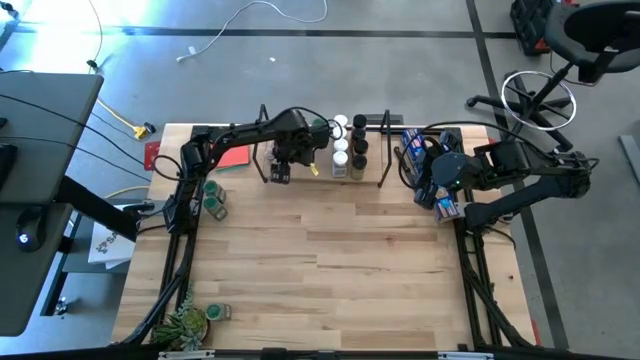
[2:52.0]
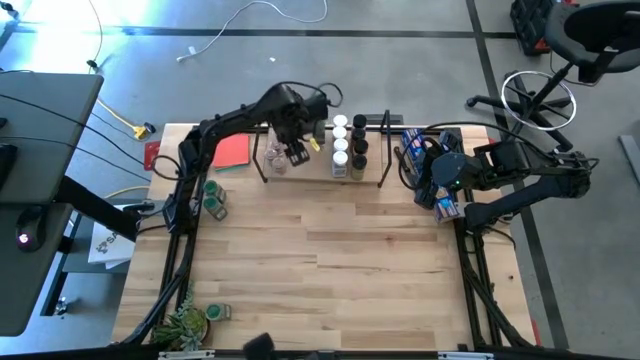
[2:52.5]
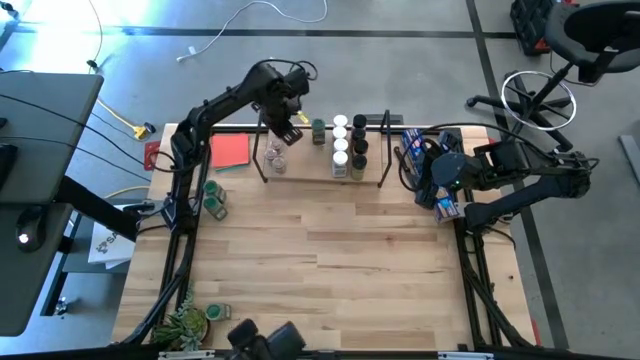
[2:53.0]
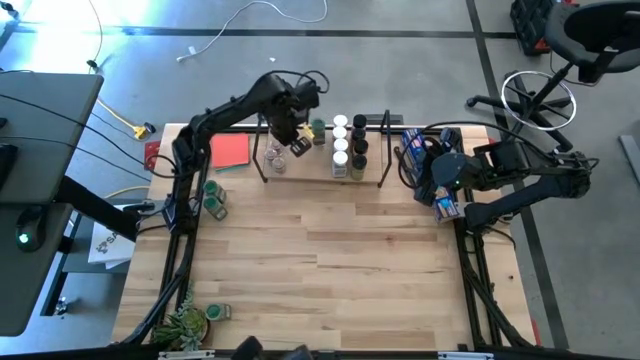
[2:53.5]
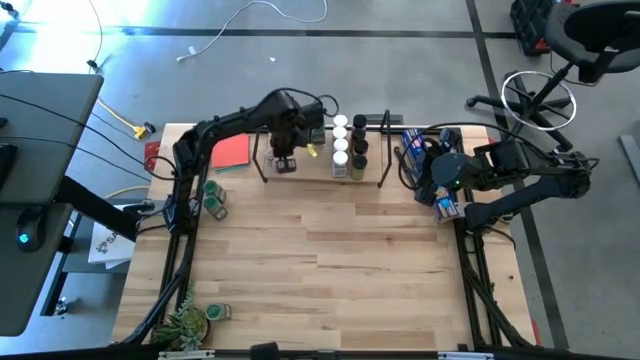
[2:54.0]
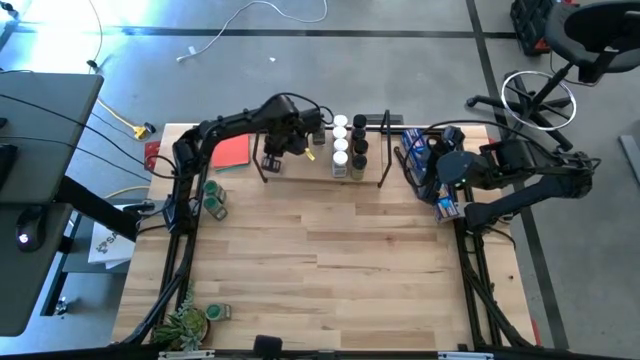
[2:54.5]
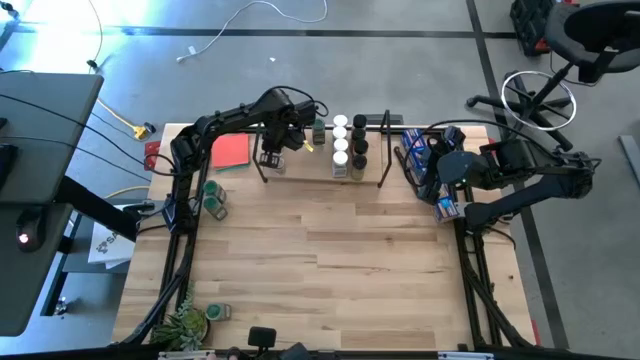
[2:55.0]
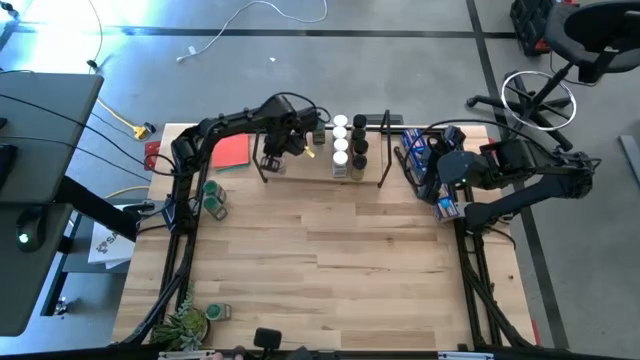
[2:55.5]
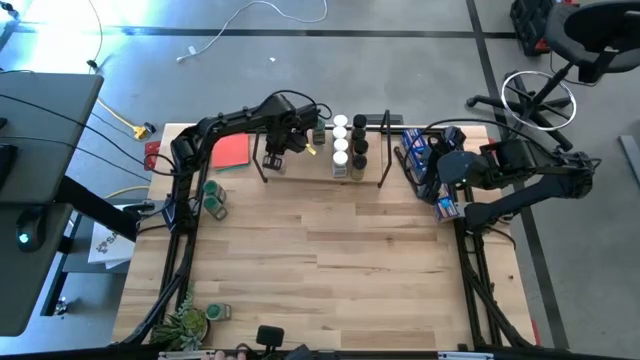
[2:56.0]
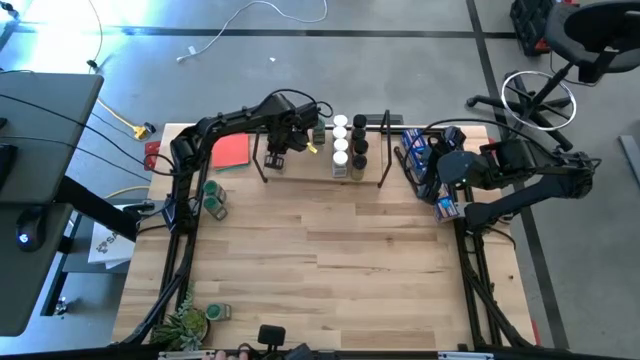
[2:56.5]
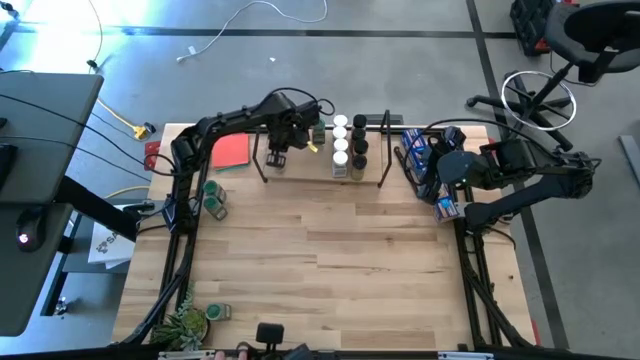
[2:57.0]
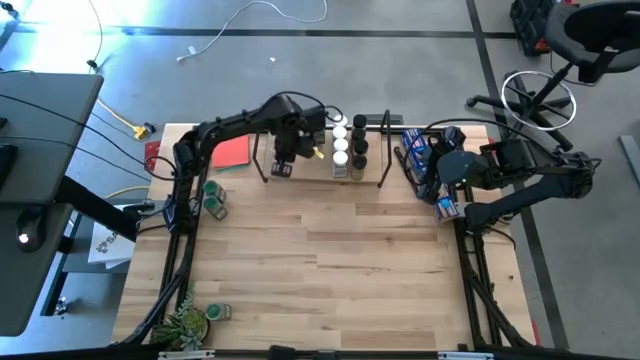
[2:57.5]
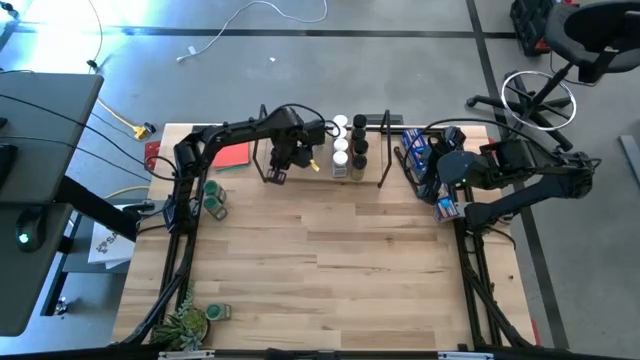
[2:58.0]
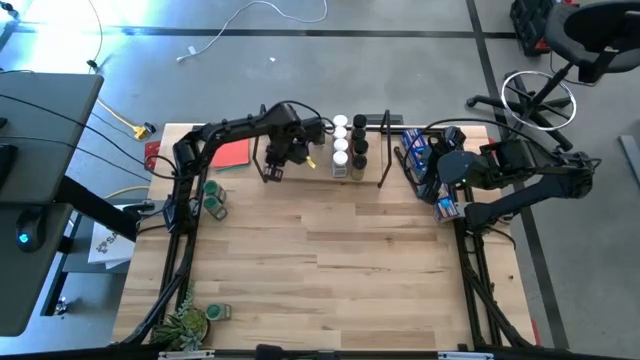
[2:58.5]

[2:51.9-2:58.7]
Task: Shelf spices
Adjust the brown seasoning bottles on the shelf

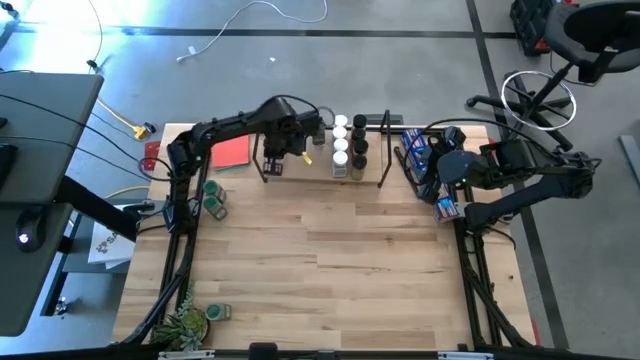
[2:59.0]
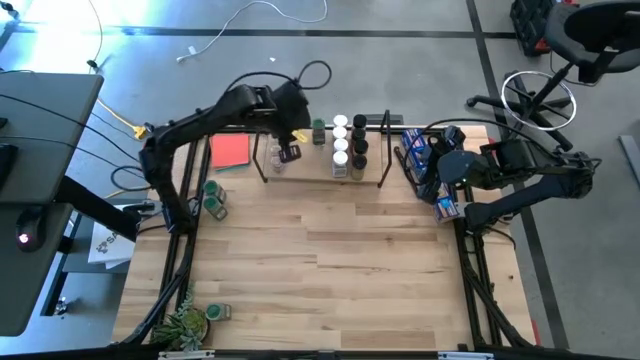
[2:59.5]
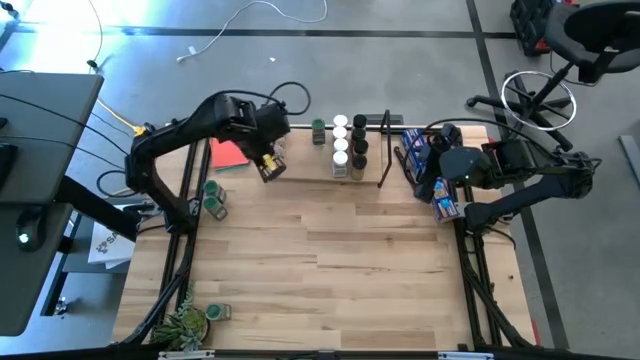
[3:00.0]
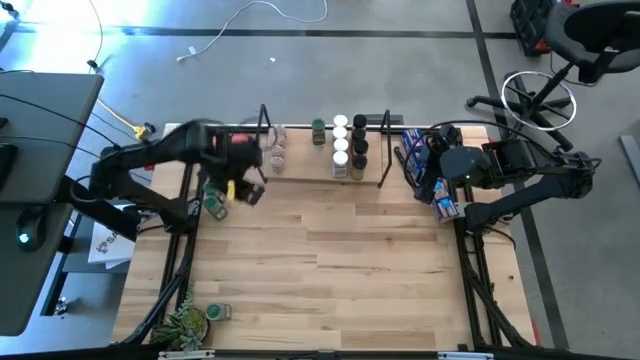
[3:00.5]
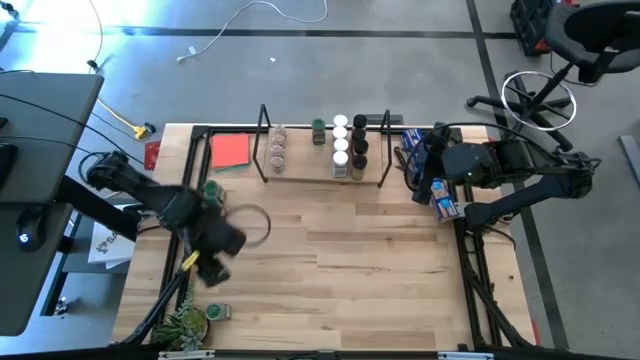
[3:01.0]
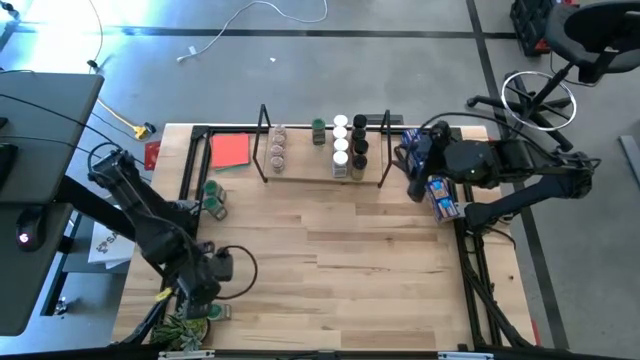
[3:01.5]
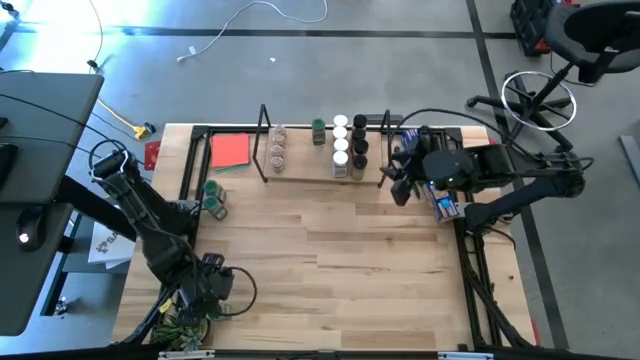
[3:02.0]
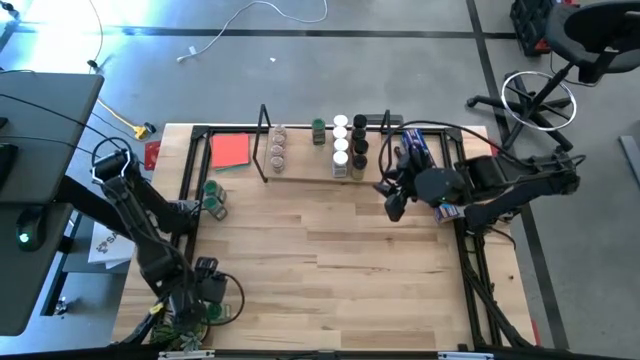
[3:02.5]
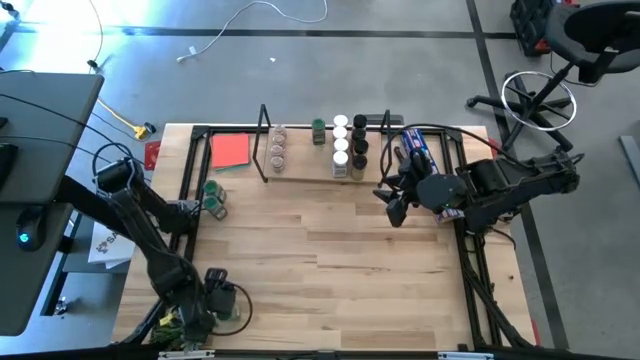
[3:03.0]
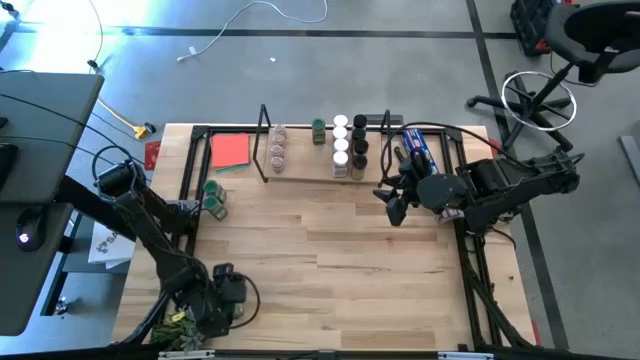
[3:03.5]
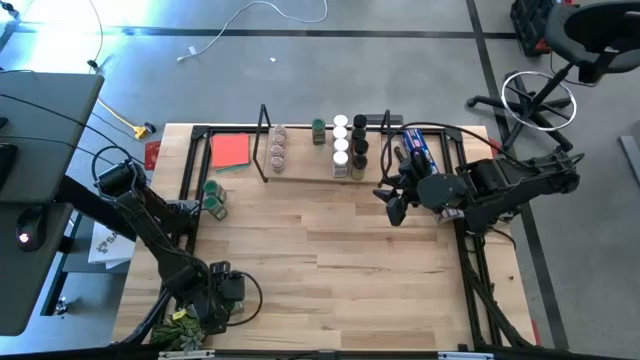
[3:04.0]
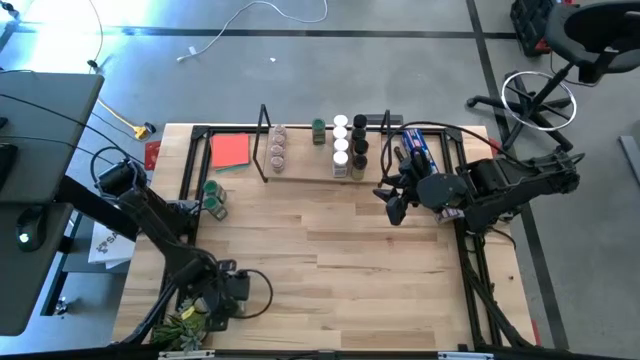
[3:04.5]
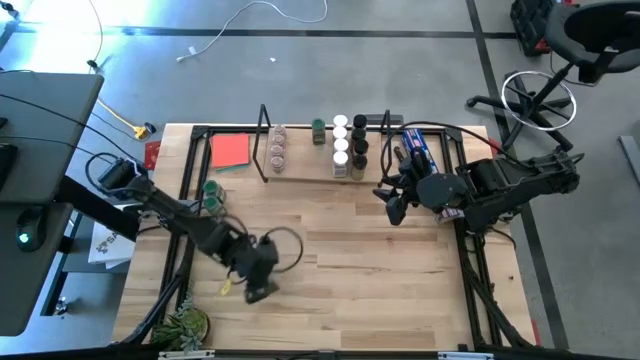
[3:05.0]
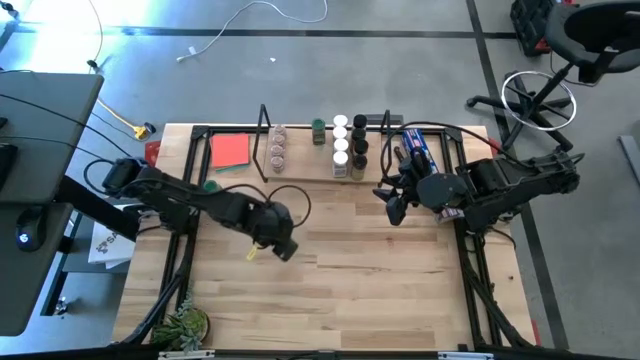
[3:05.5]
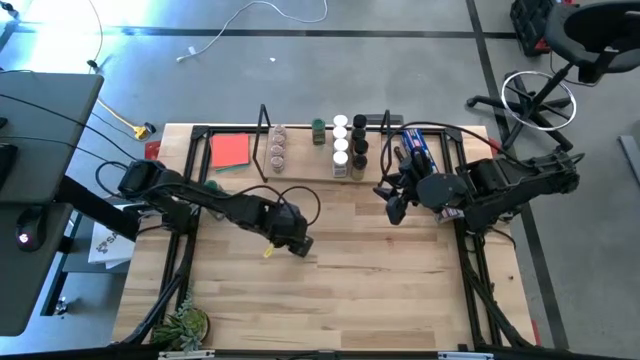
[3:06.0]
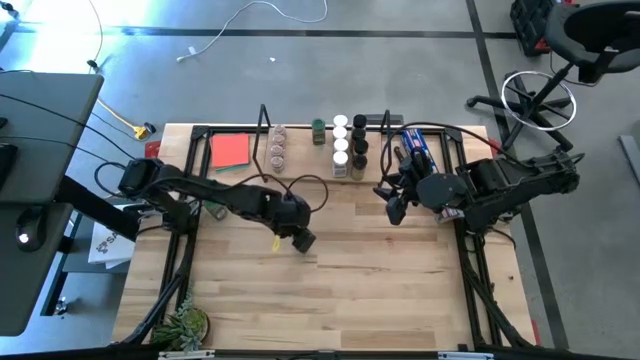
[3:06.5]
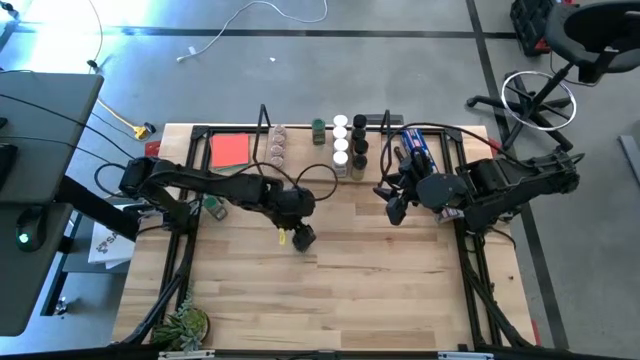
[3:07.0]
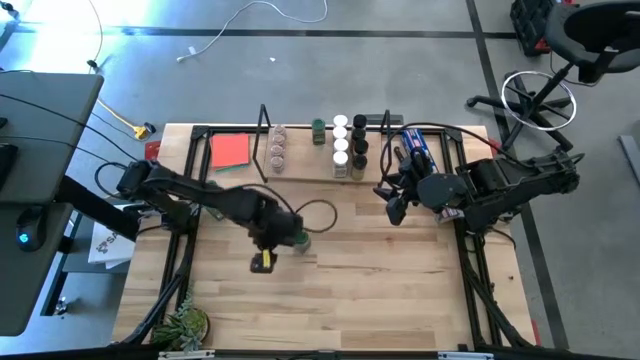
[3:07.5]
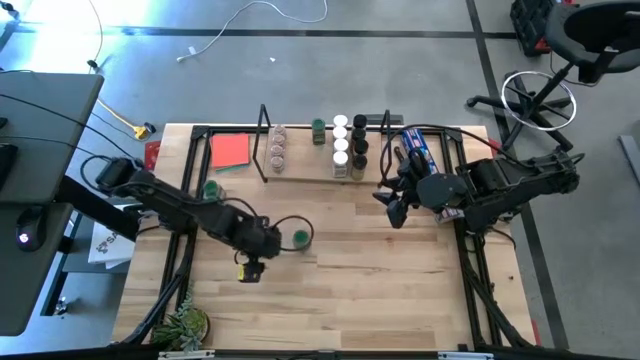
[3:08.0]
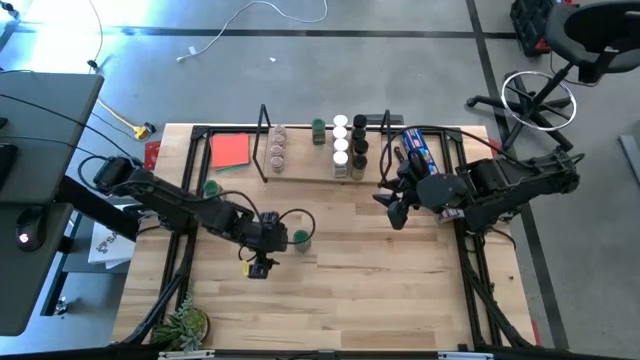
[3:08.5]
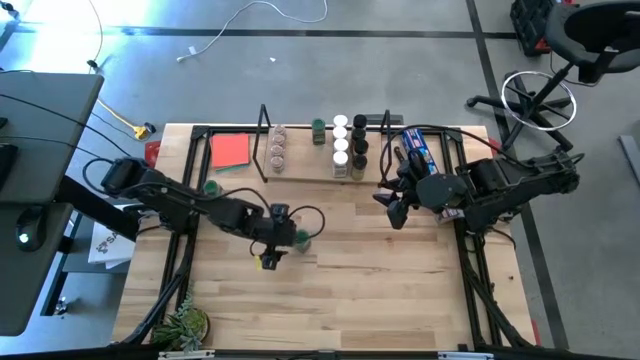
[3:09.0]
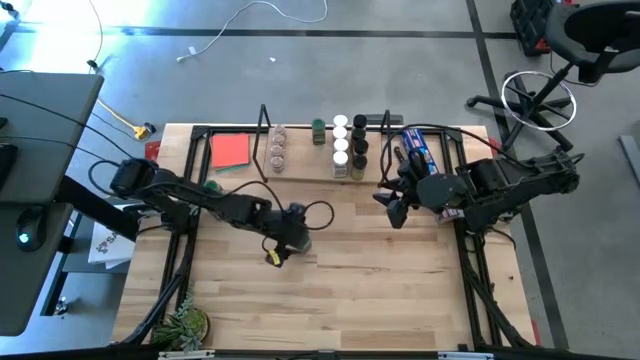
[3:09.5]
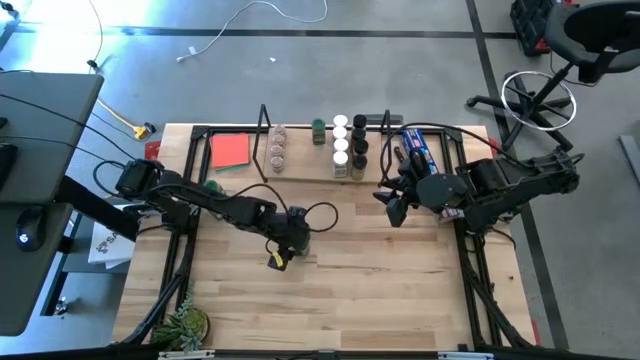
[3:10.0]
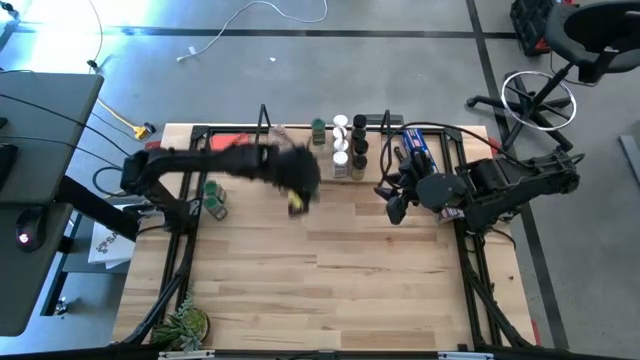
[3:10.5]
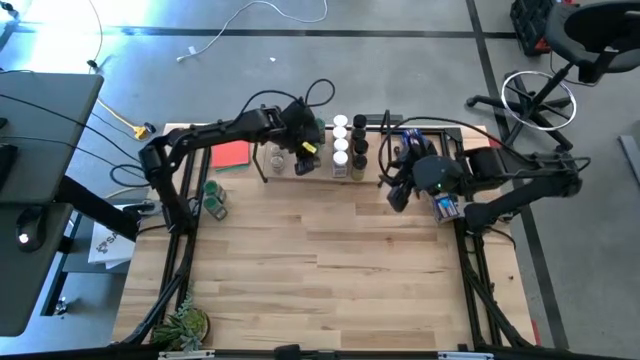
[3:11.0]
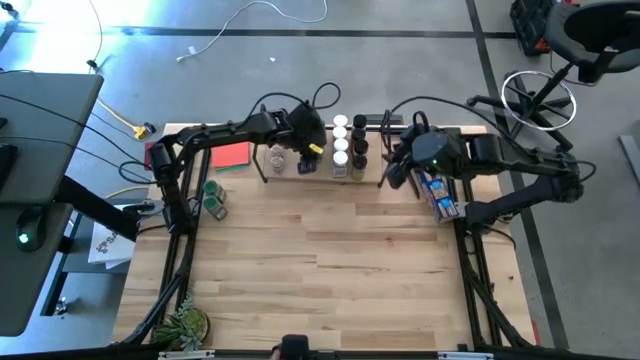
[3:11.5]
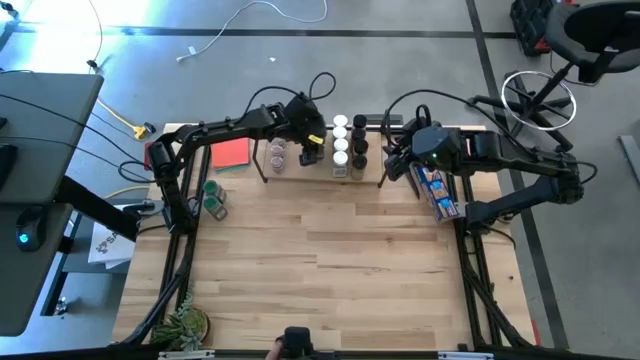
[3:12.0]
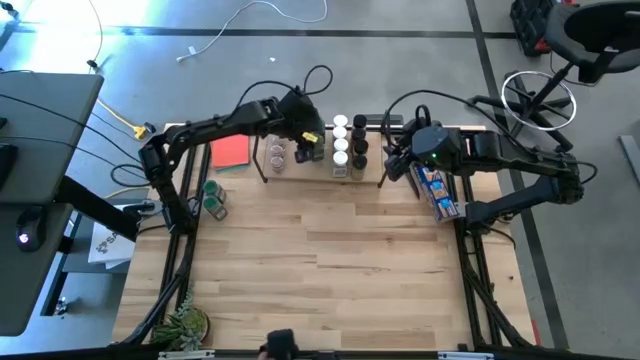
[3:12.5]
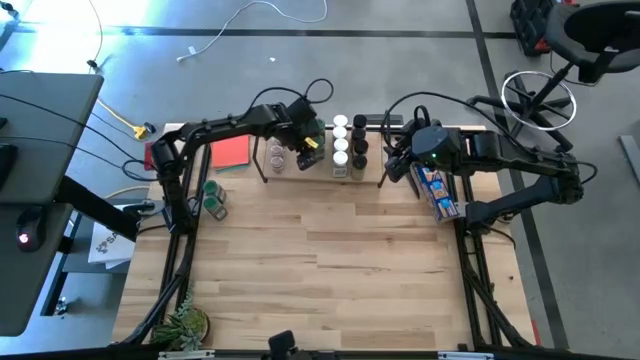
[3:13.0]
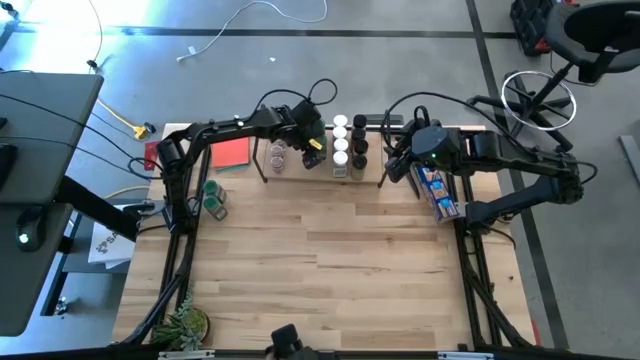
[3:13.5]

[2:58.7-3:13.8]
Put the bottom left green seasoning bottle on the shelf aligned with the other green seasoning bottle
